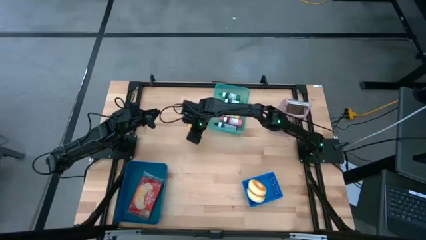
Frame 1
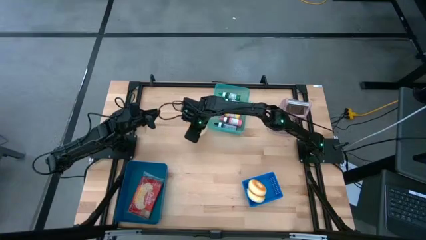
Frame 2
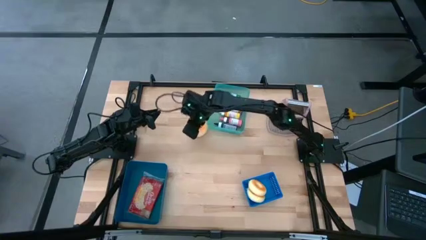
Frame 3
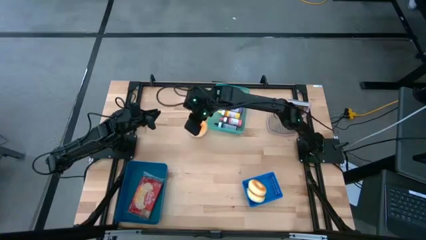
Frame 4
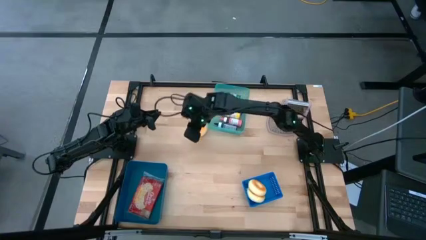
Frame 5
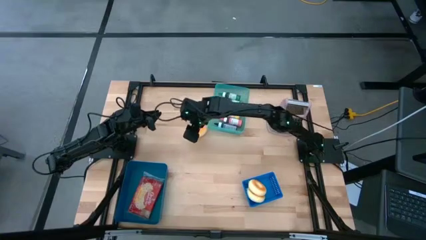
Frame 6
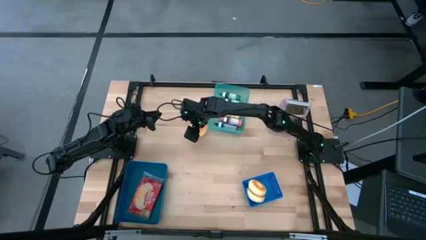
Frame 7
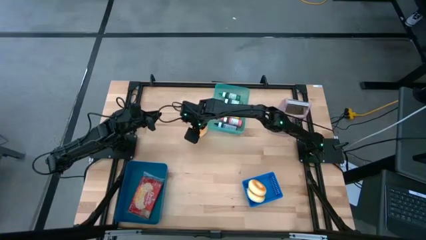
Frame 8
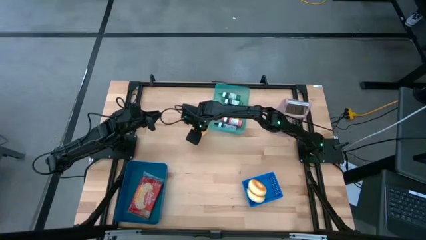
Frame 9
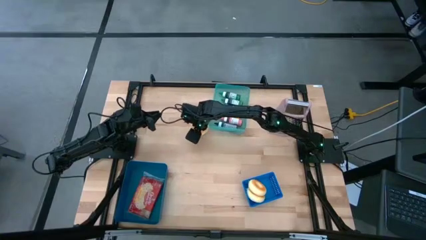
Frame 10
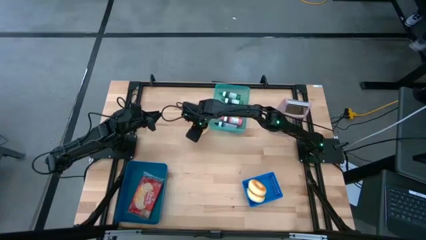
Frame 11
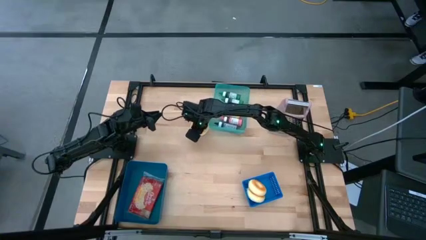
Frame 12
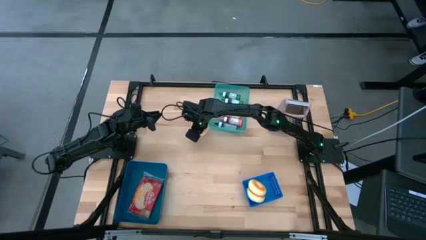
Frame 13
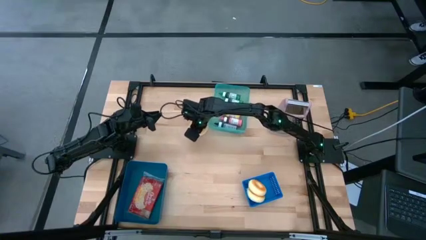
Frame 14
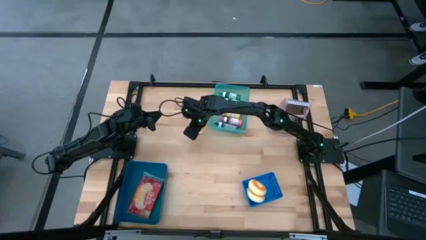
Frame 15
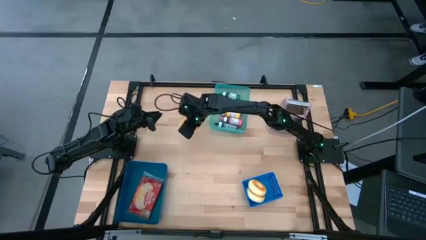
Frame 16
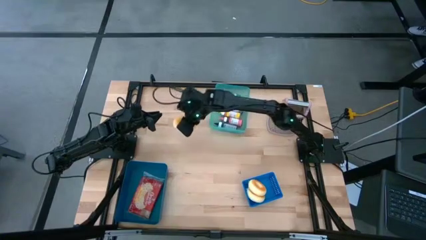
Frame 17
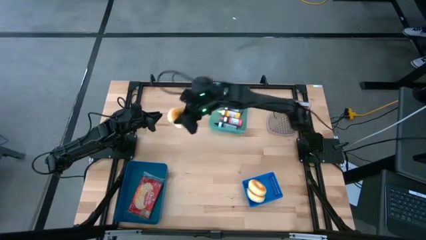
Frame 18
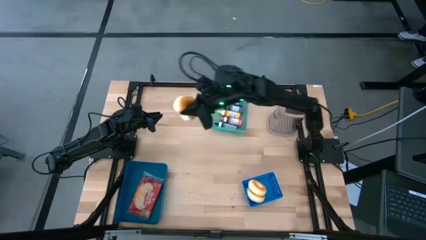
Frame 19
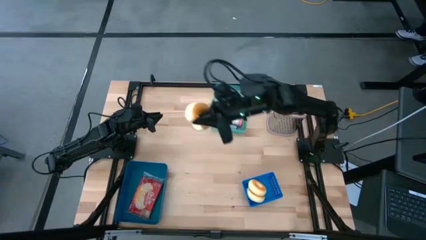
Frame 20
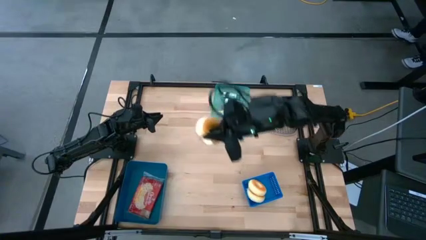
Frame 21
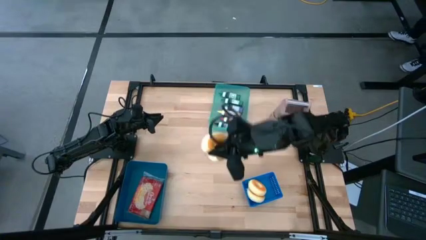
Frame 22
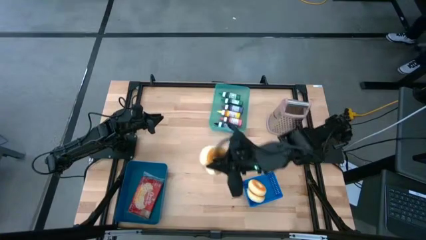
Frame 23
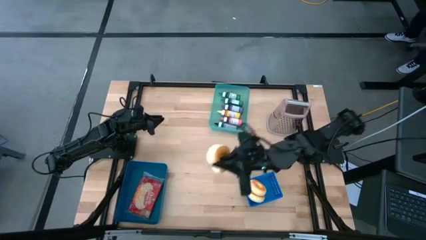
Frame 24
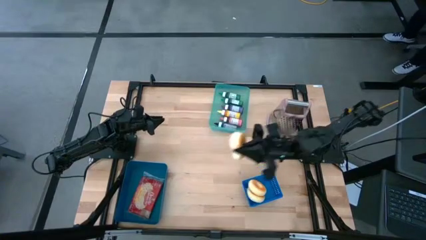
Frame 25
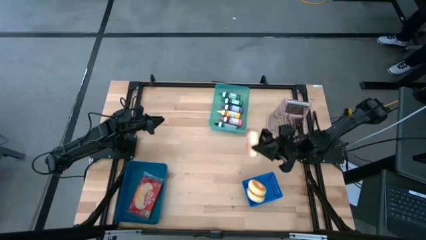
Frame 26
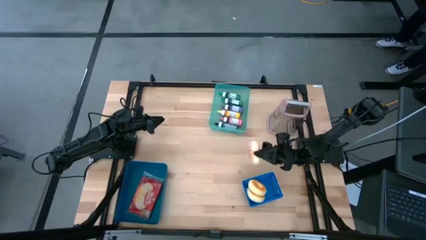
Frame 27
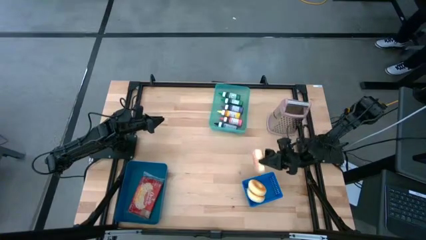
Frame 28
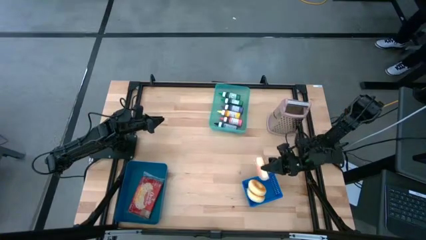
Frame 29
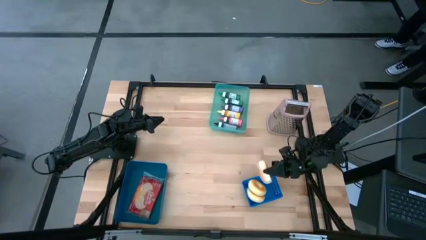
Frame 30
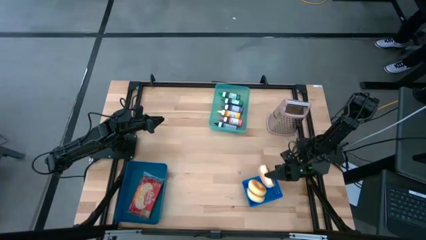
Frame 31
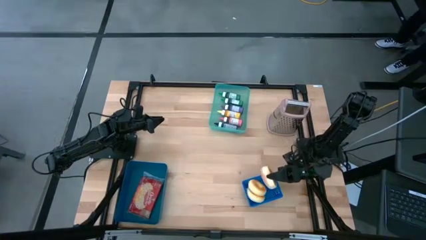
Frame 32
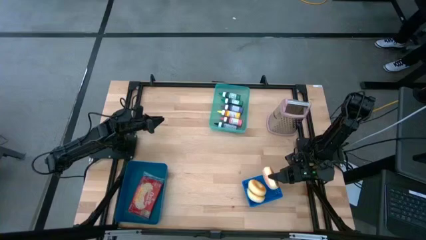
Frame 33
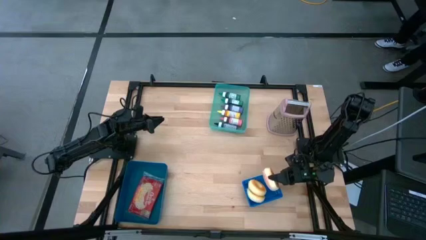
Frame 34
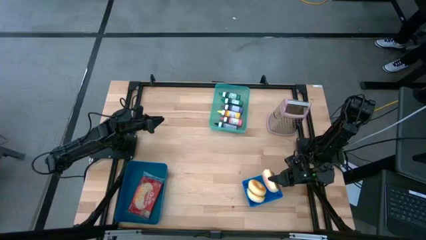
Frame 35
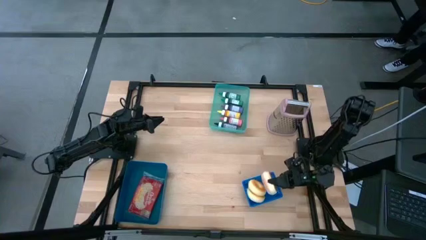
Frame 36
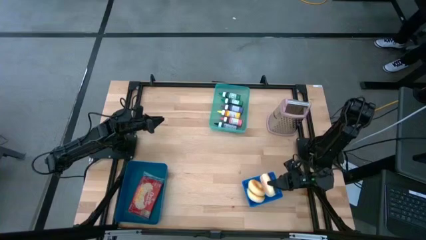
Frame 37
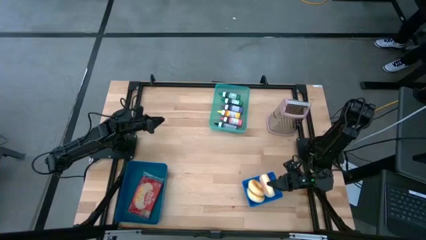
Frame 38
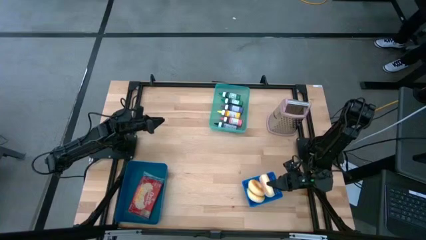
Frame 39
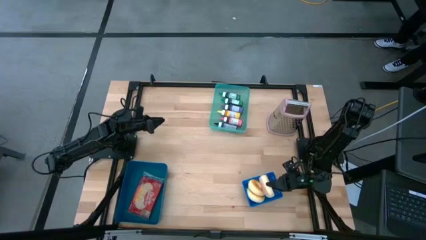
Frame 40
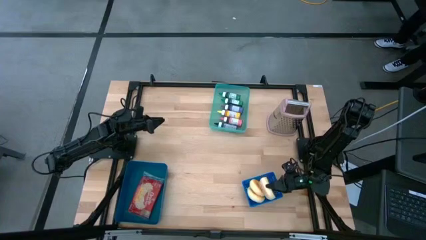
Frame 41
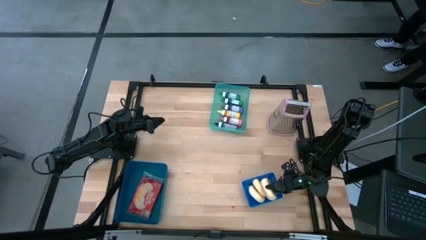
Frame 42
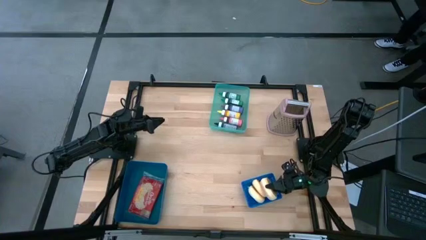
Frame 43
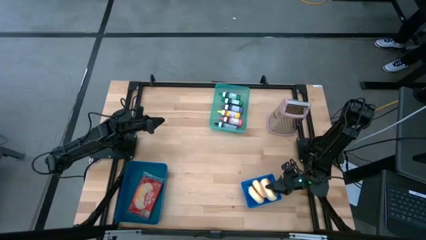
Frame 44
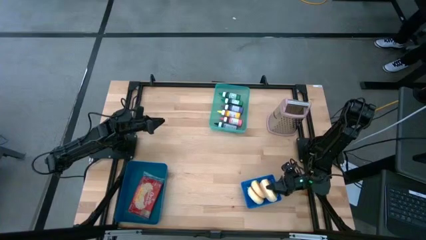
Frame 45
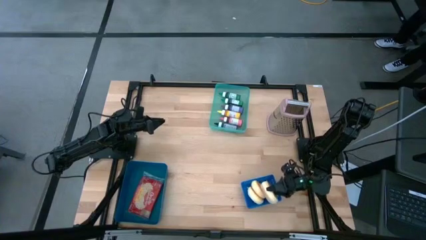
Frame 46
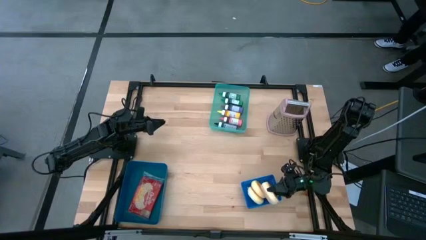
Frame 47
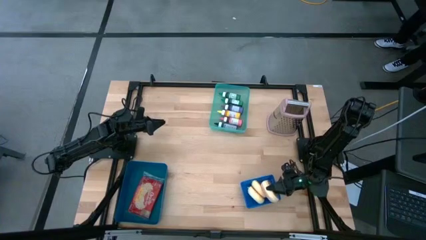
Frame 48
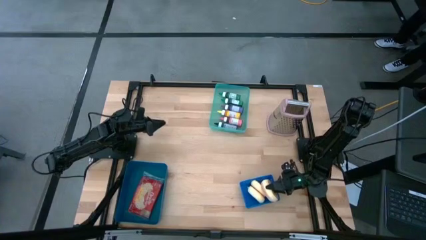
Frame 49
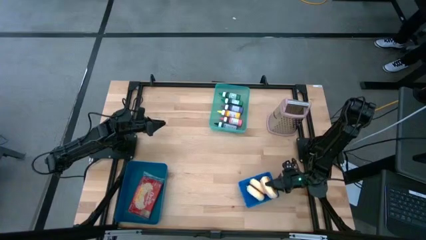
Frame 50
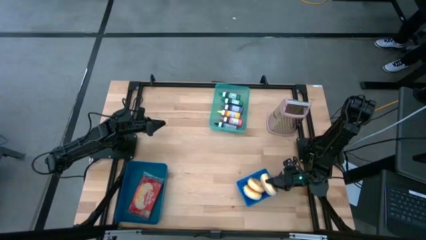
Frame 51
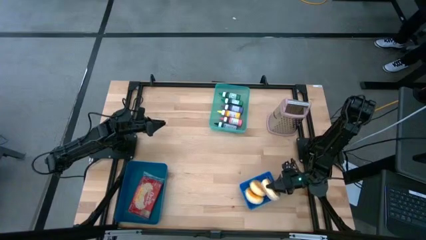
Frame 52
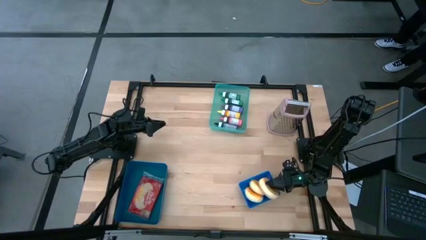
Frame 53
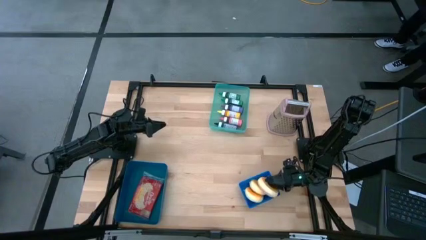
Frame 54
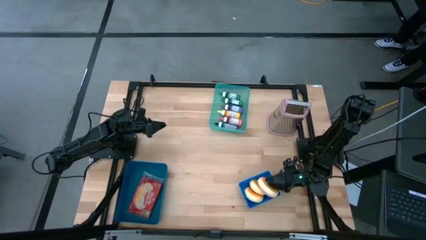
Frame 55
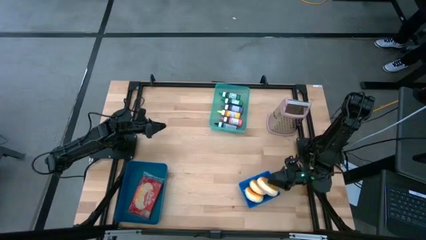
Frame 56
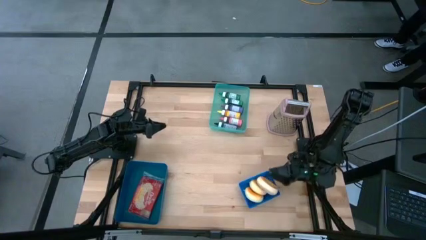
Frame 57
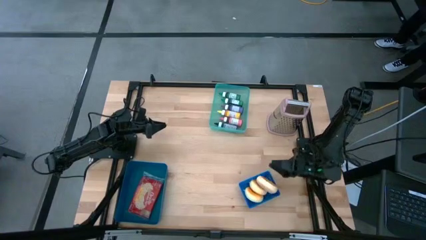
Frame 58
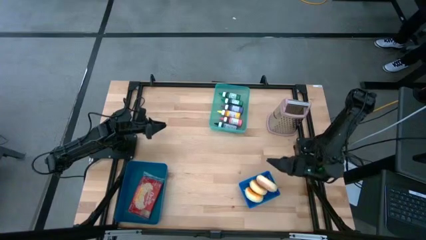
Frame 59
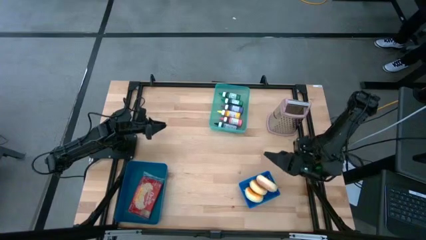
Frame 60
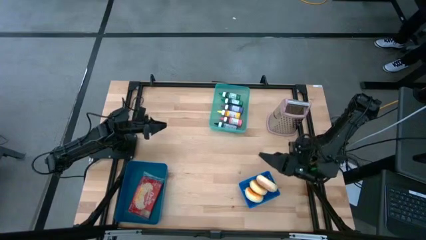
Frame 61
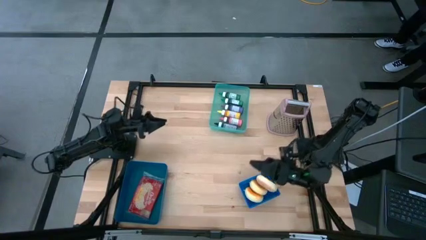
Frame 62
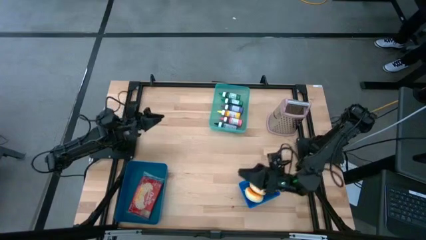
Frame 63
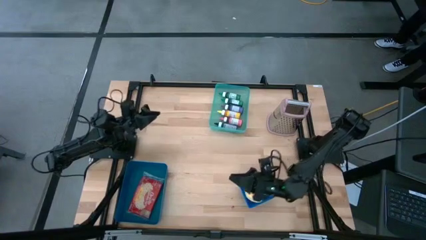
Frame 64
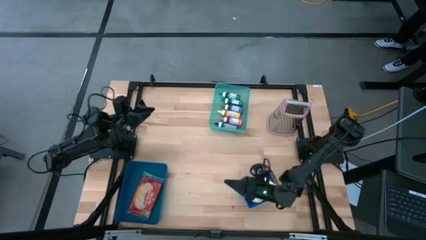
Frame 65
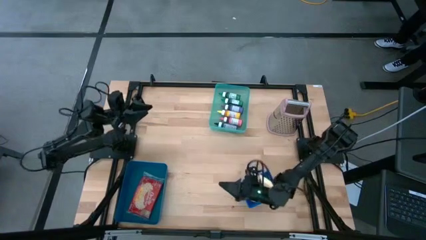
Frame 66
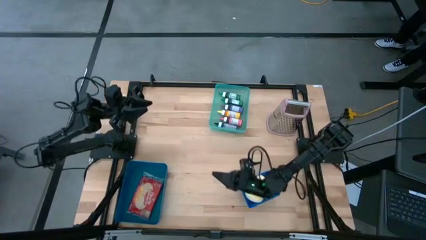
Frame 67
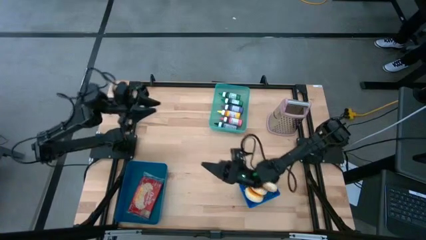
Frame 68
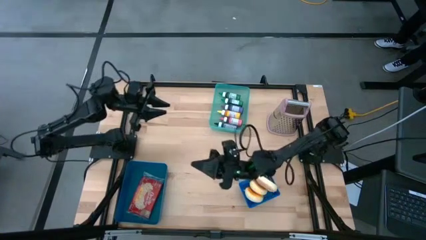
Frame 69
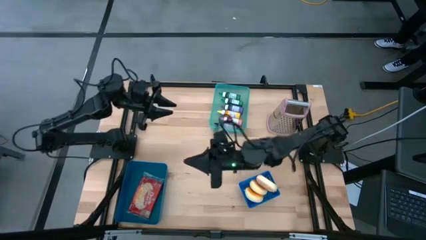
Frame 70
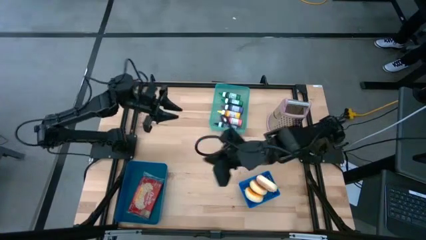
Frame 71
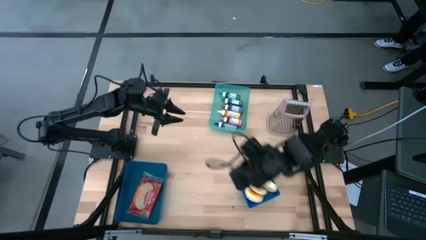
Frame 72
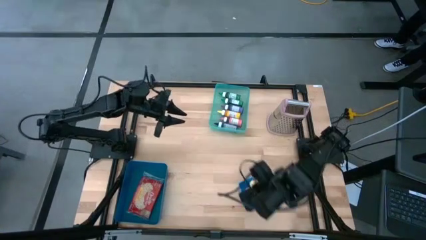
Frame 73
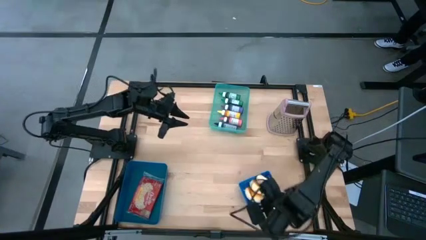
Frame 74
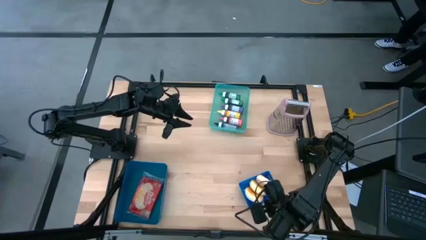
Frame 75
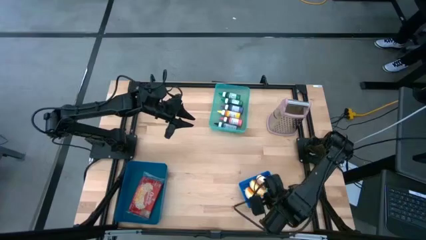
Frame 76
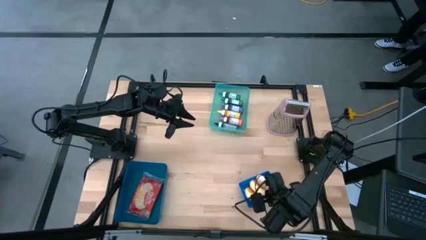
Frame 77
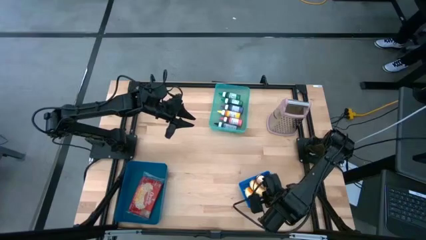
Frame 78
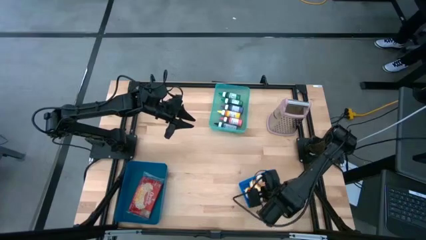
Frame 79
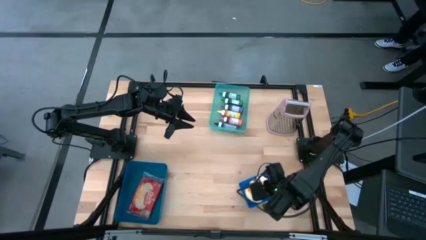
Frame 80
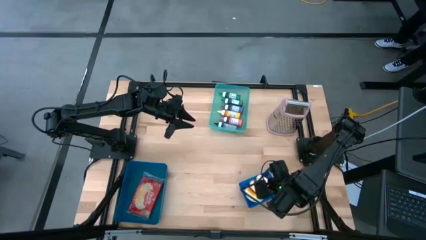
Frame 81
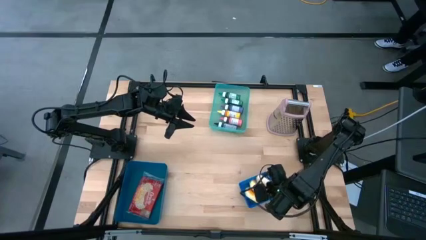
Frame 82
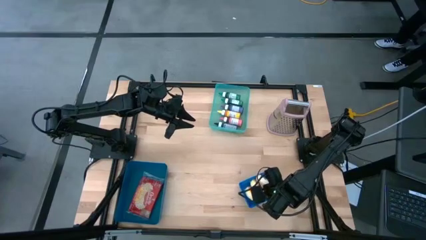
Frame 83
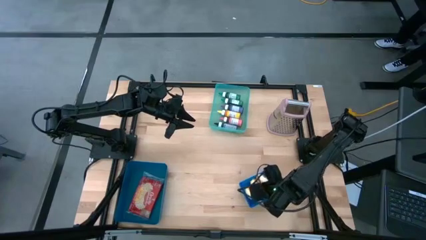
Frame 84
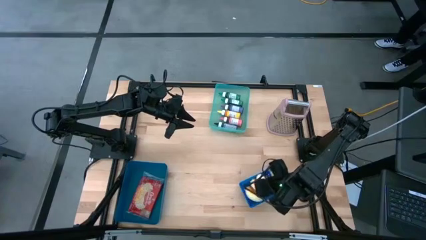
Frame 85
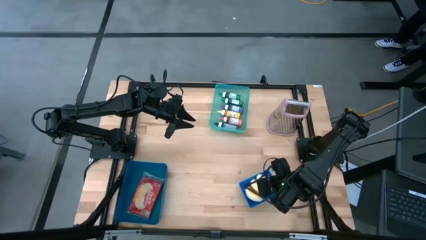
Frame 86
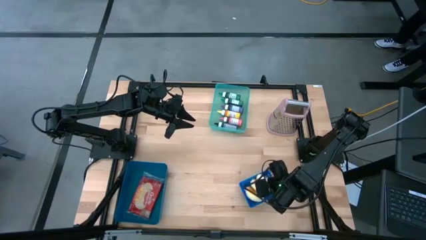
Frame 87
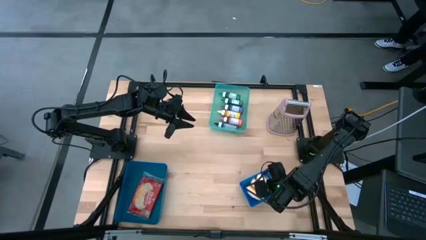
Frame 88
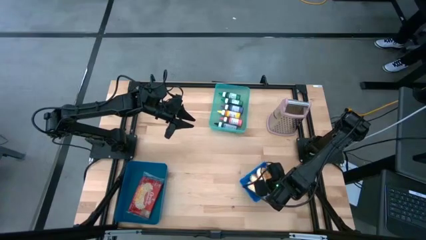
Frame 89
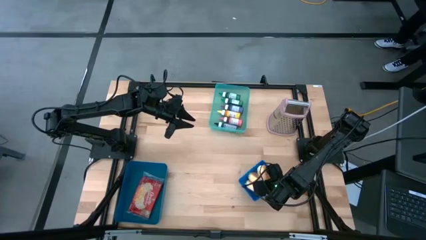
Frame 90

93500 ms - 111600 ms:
Put the pink donut into the blue bin
